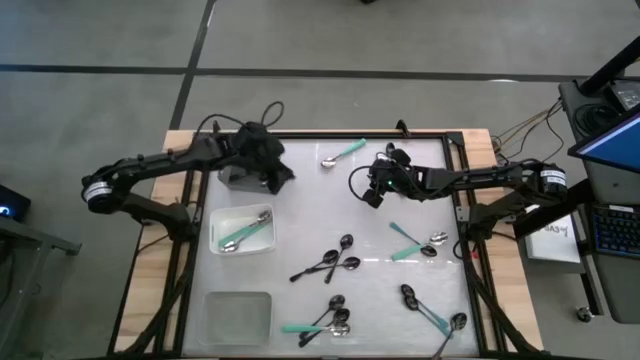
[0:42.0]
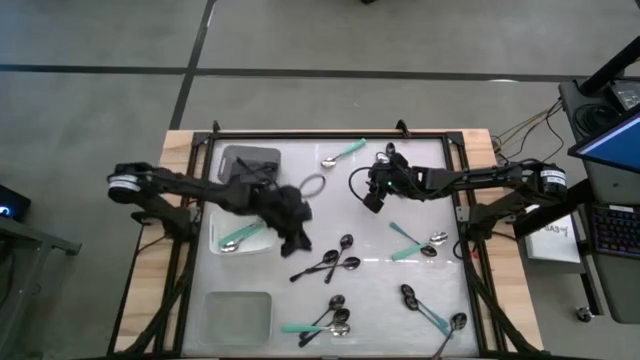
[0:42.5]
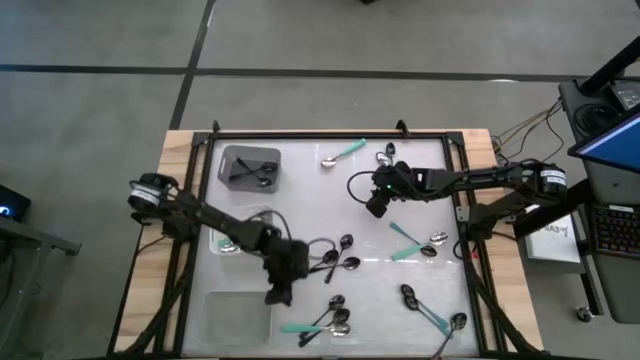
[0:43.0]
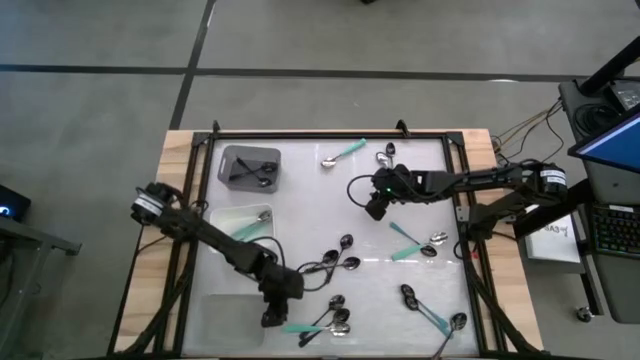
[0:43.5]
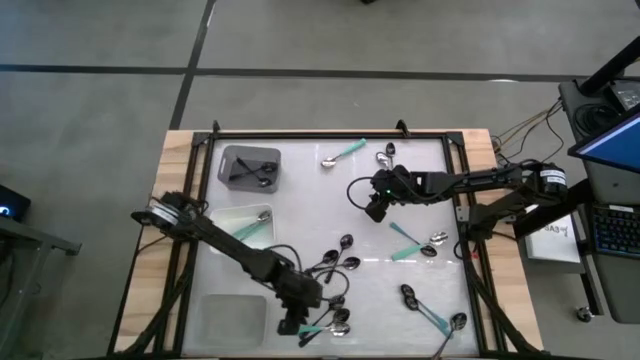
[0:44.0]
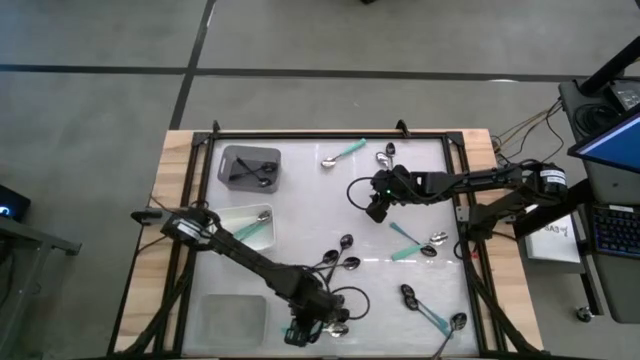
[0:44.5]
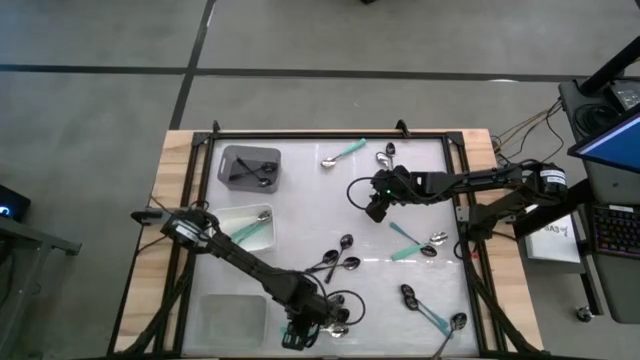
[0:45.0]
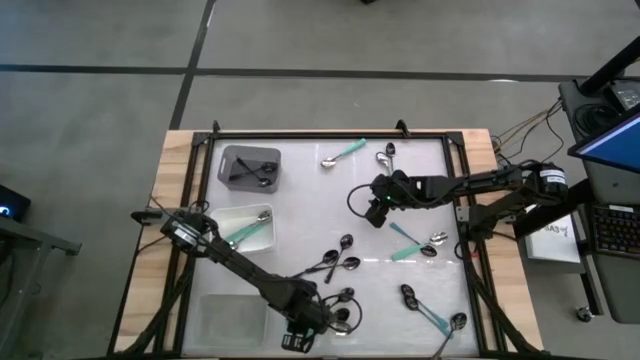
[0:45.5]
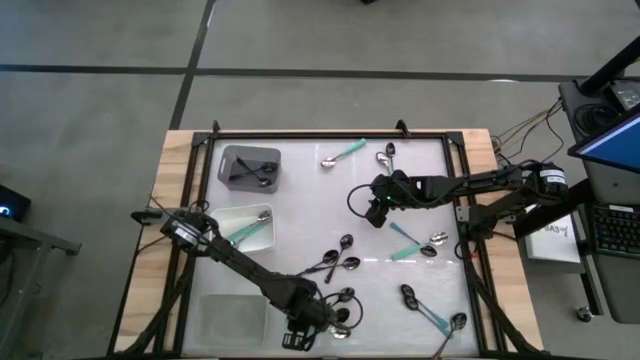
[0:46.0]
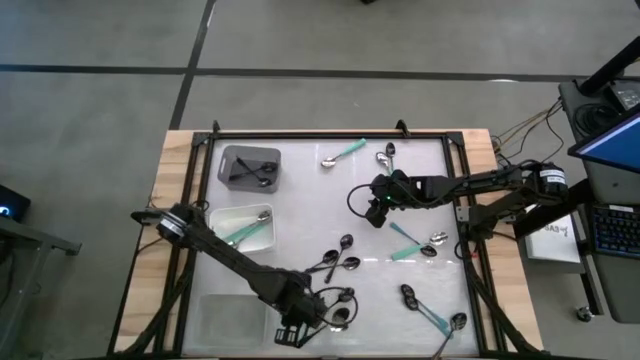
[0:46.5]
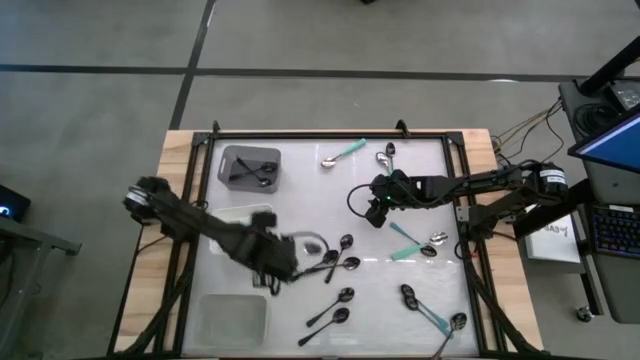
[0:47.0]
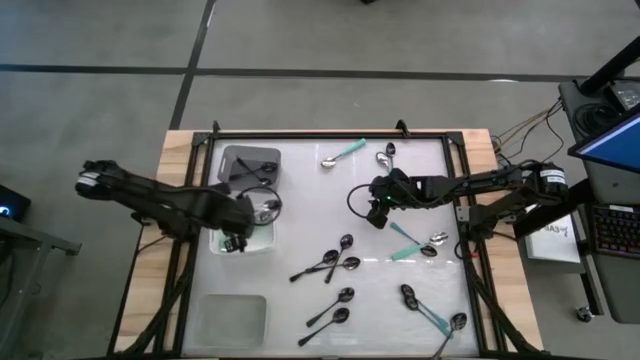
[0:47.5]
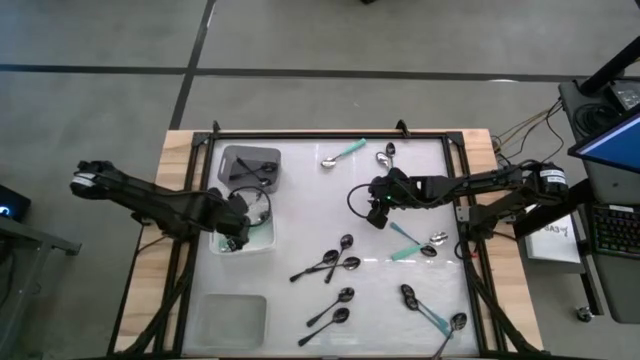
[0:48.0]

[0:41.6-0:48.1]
Task: Sort silverware by color (type)
Put the light green spoon into the white bin

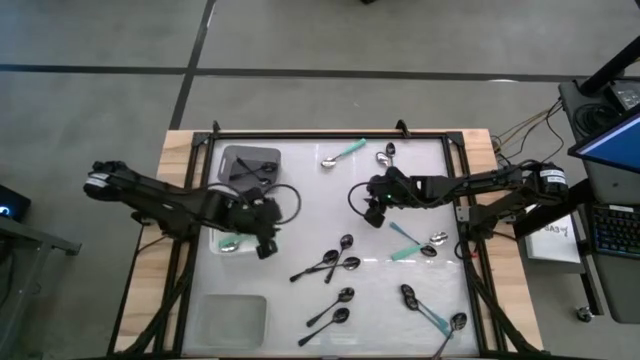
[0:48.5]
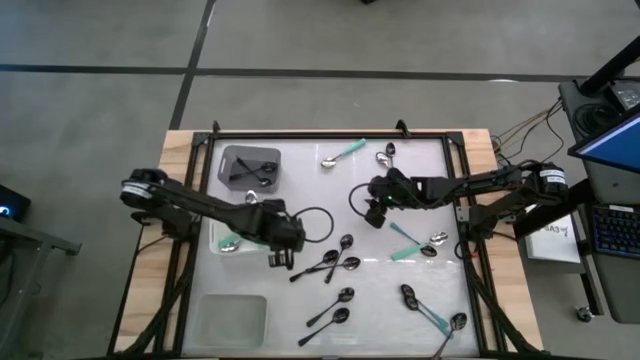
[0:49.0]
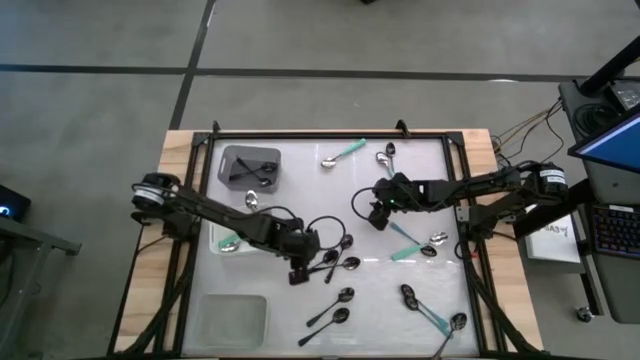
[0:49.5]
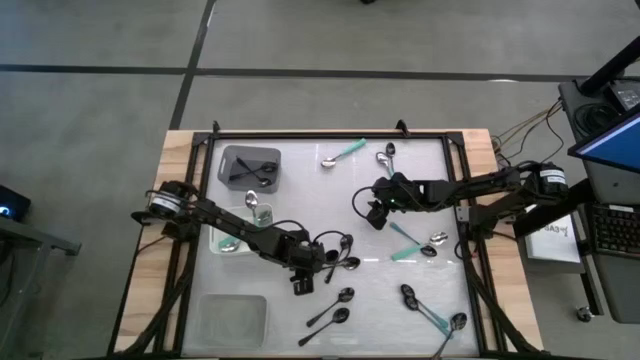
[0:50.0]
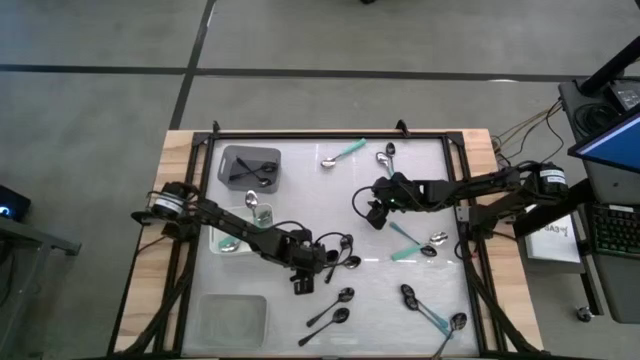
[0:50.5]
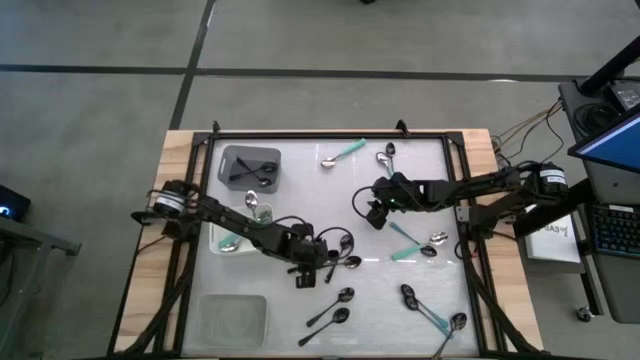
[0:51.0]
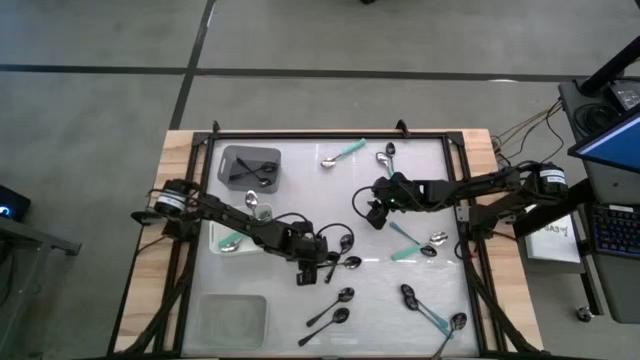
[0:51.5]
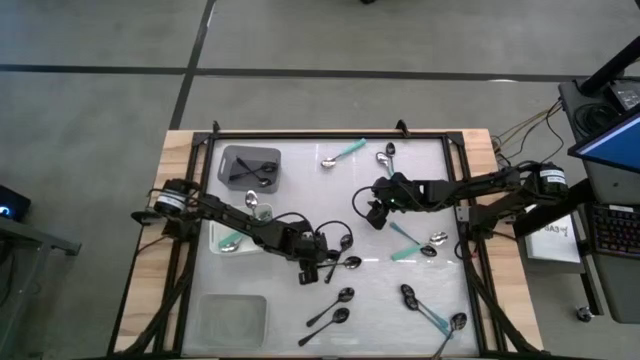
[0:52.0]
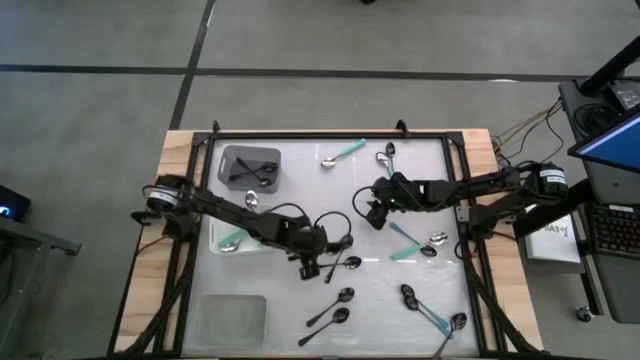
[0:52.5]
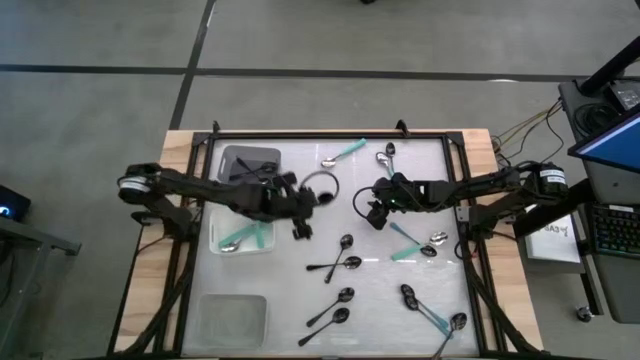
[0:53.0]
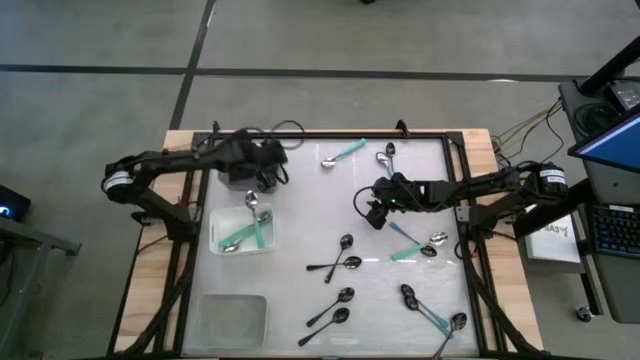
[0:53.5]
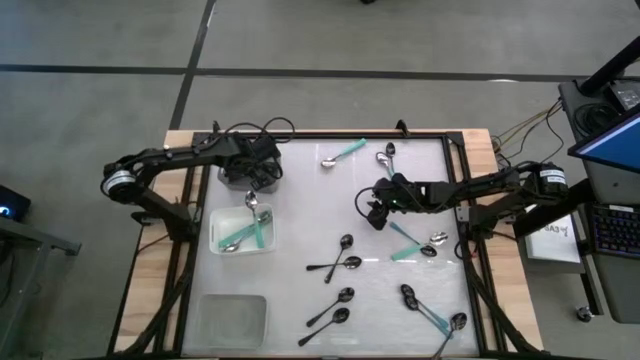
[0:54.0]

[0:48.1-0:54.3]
Put the black spoon into the black bin

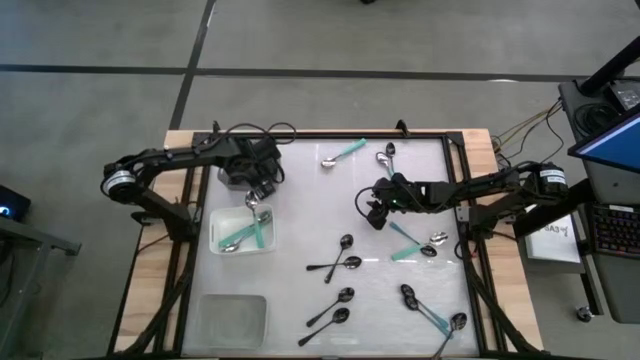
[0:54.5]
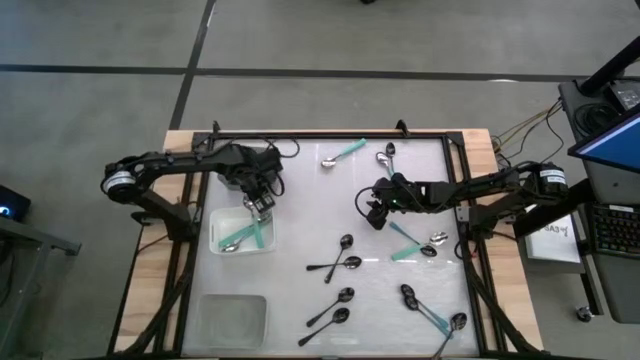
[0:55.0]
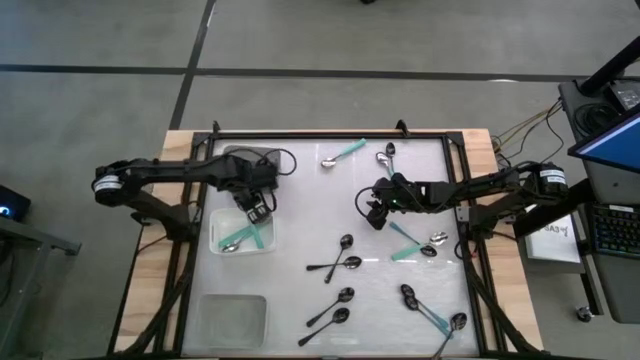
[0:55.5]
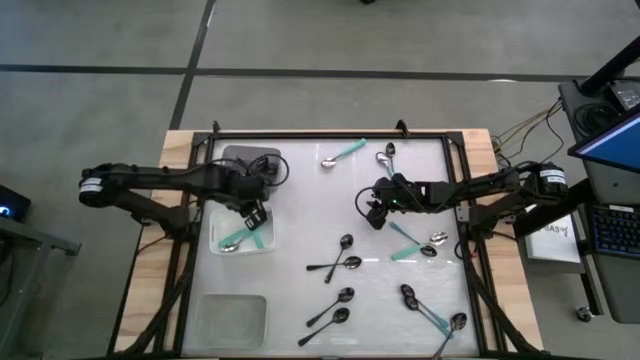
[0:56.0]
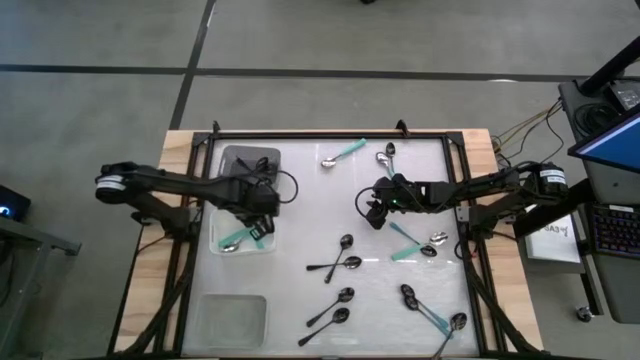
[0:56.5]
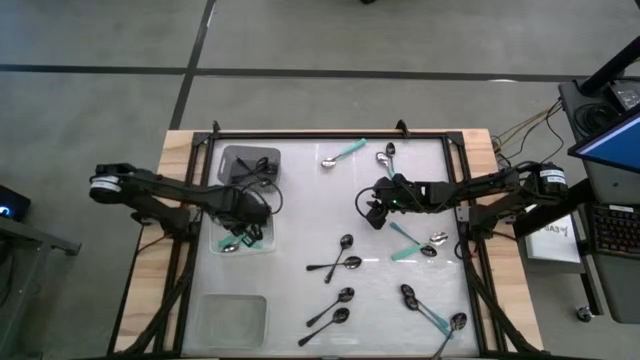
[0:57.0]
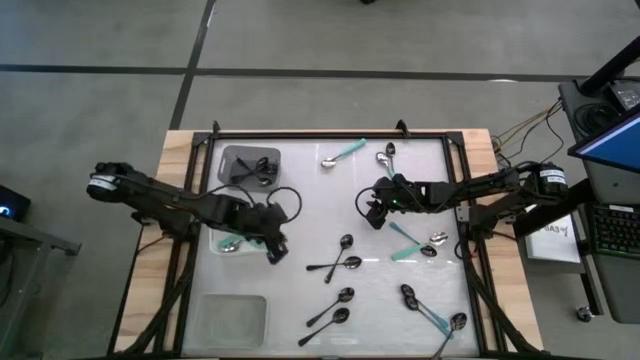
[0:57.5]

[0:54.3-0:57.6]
Adjust the light green spoon in the white bin

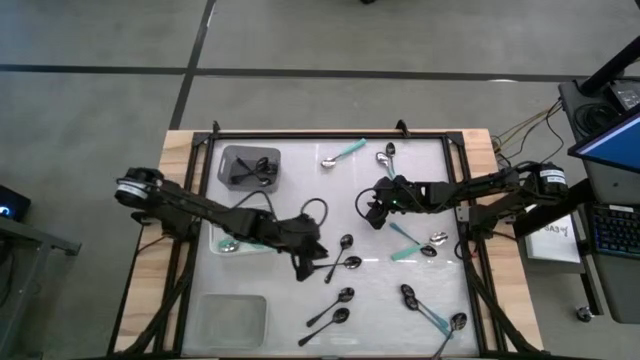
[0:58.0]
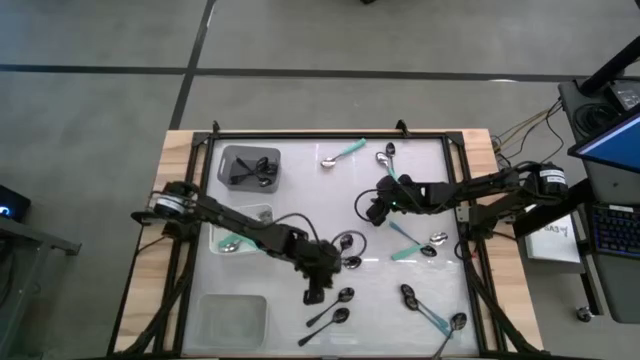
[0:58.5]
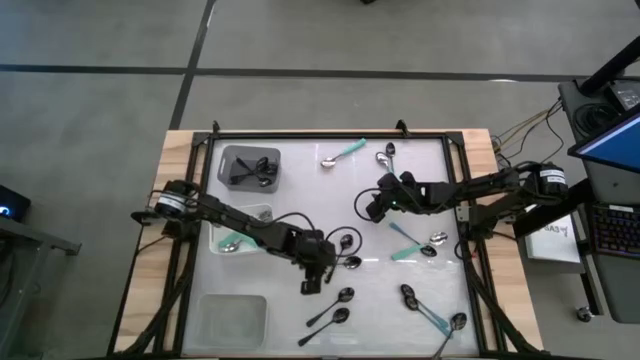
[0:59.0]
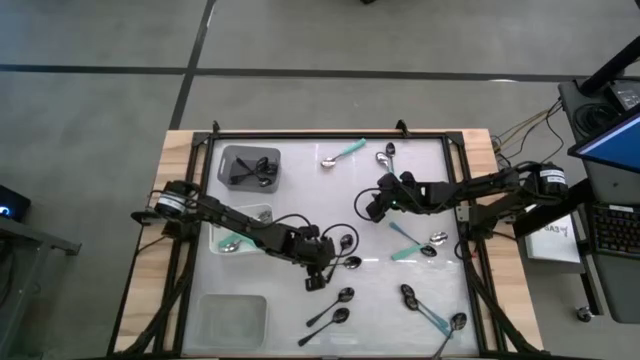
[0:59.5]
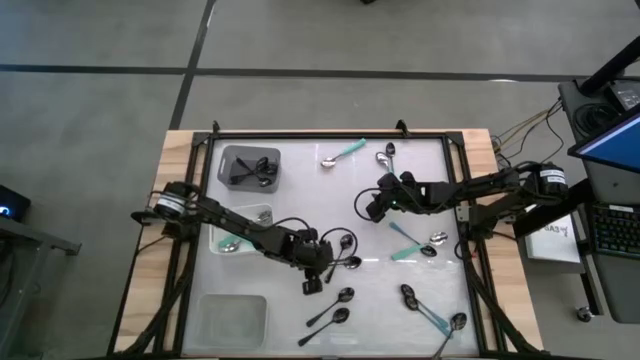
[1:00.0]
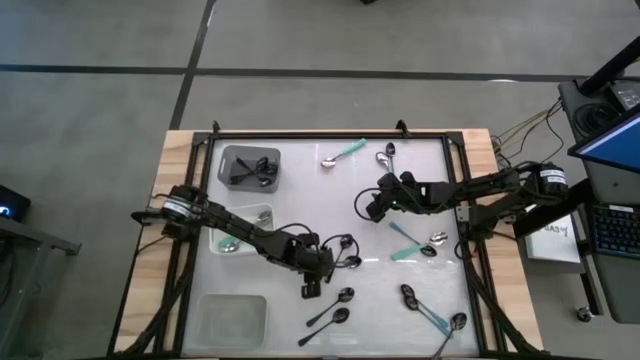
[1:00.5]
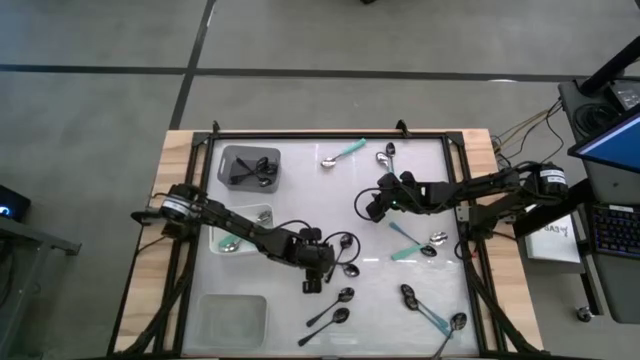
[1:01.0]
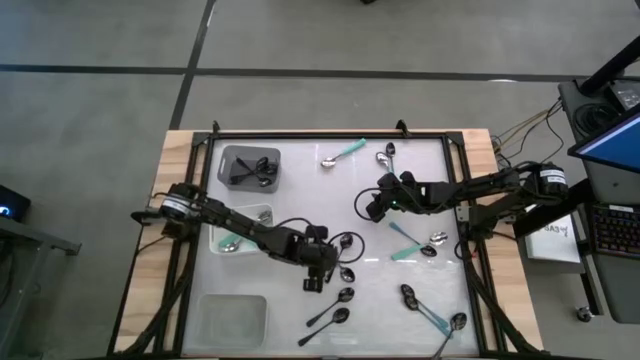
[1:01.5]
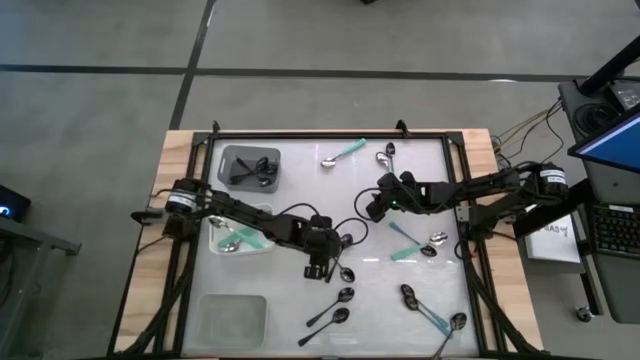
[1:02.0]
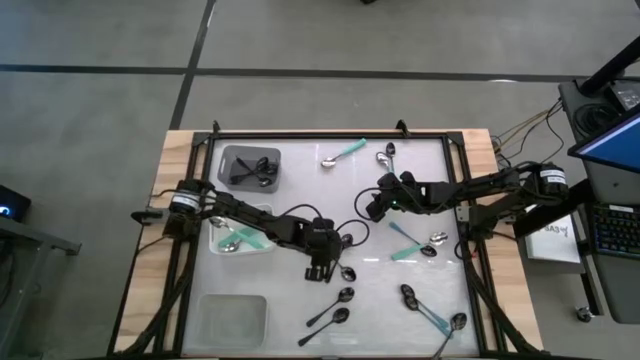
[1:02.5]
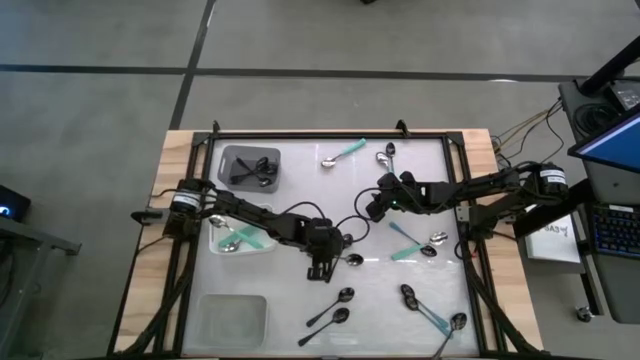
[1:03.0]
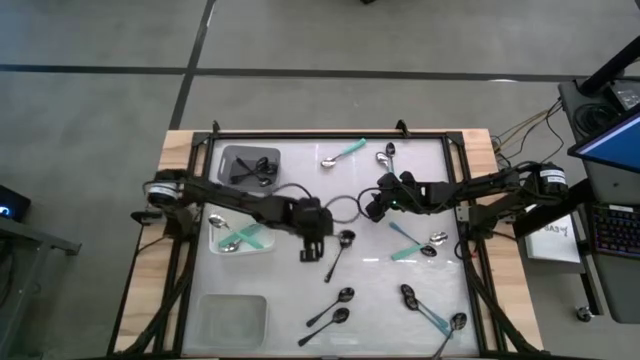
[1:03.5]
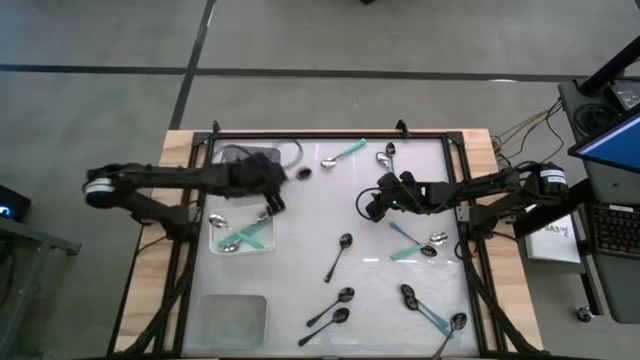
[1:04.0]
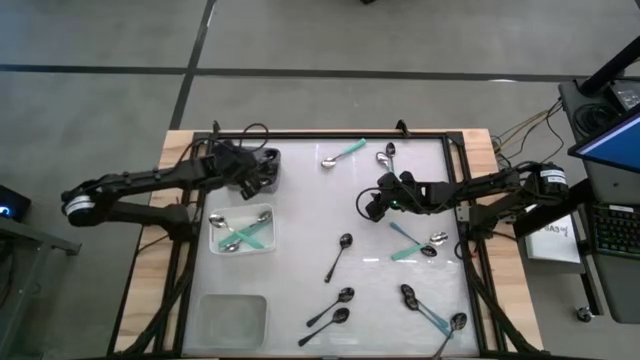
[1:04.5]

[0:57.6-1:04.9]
Put the black spoon into the black bin
